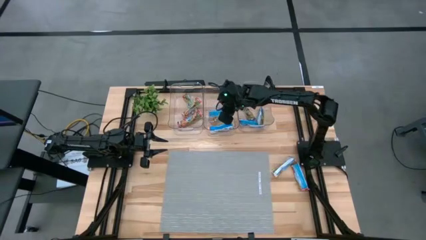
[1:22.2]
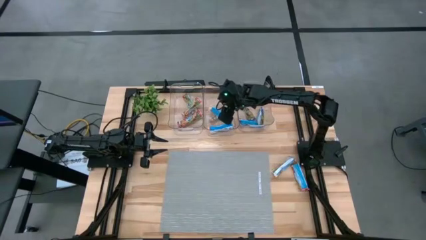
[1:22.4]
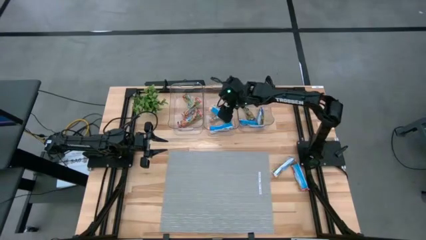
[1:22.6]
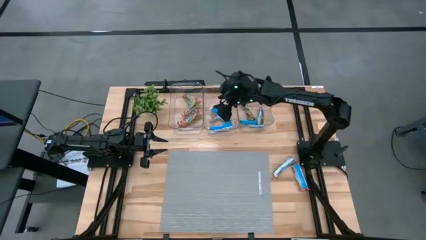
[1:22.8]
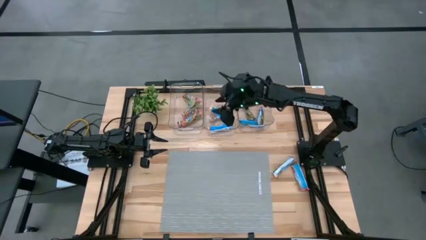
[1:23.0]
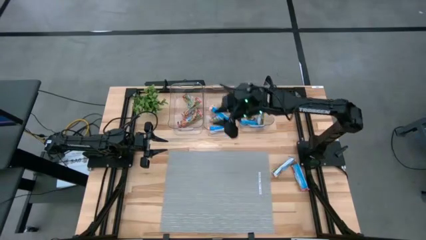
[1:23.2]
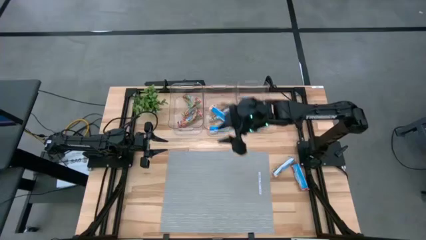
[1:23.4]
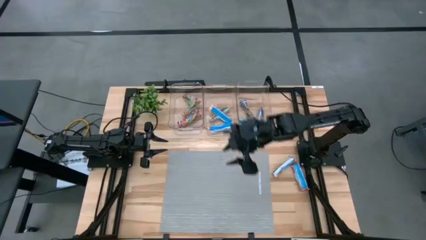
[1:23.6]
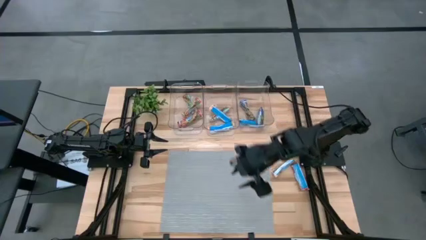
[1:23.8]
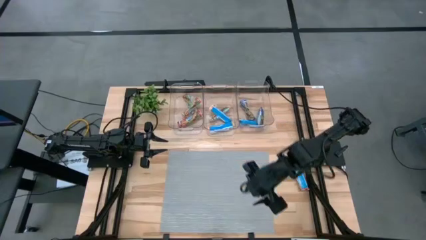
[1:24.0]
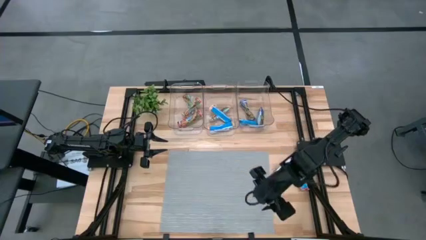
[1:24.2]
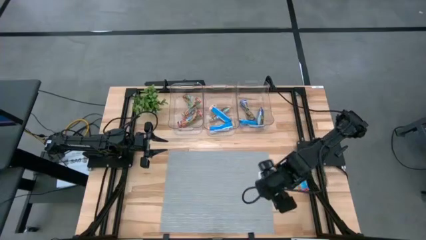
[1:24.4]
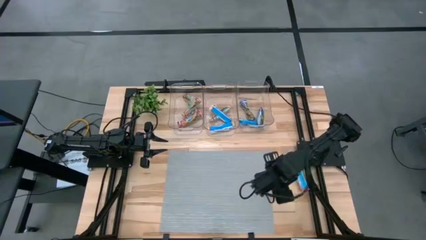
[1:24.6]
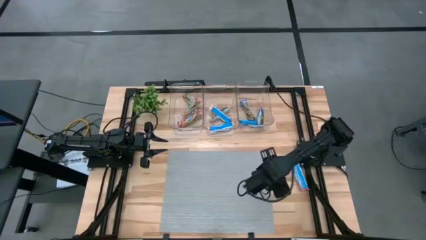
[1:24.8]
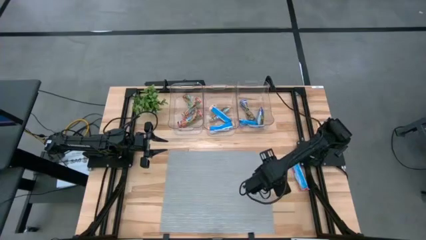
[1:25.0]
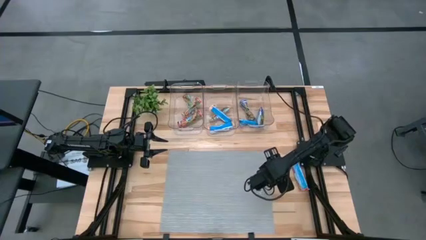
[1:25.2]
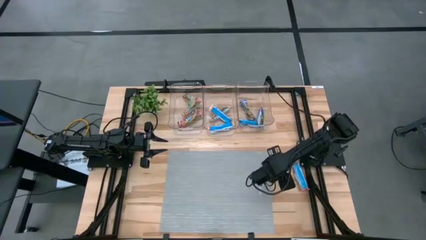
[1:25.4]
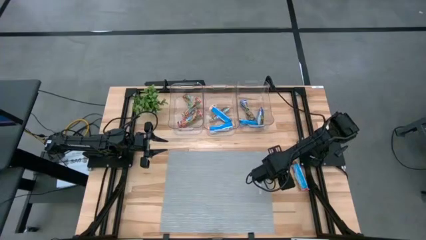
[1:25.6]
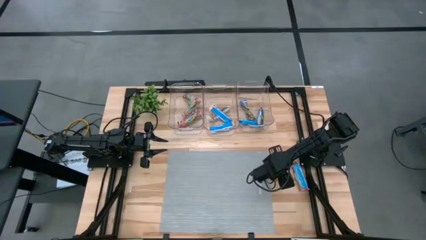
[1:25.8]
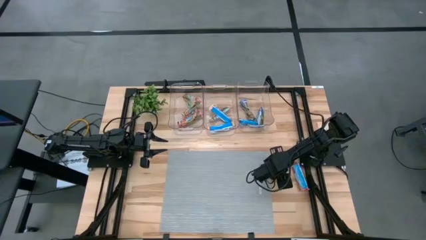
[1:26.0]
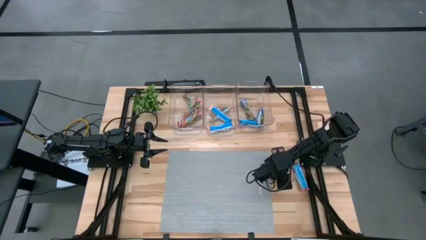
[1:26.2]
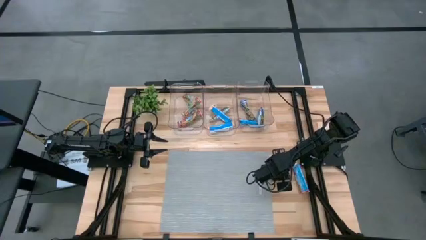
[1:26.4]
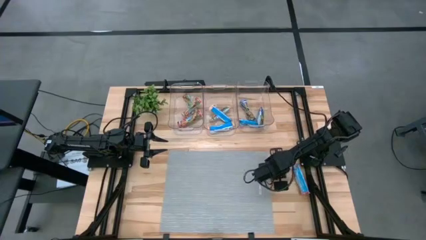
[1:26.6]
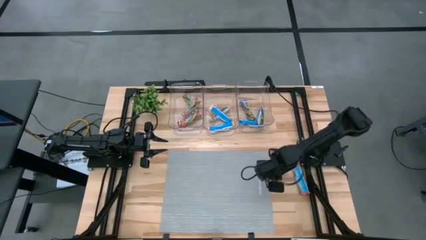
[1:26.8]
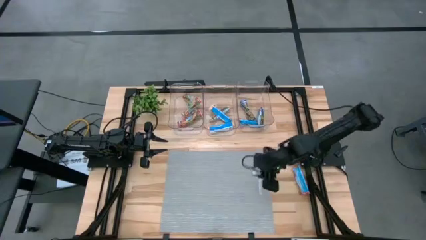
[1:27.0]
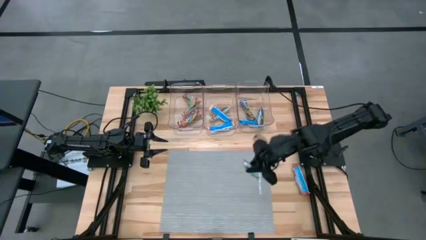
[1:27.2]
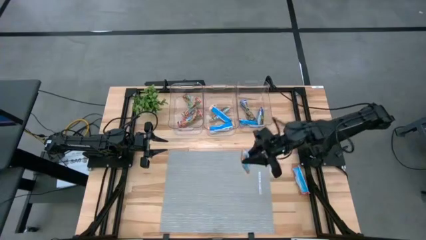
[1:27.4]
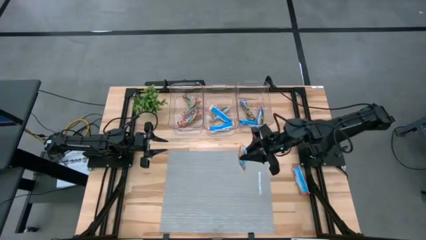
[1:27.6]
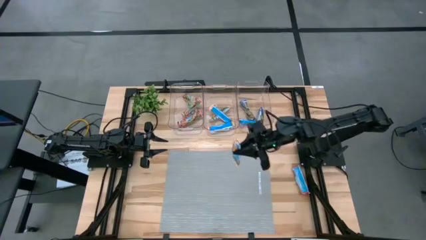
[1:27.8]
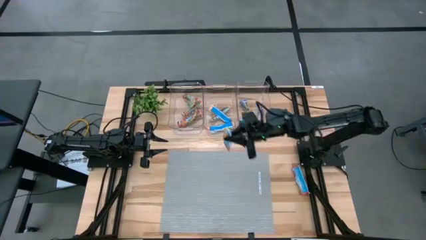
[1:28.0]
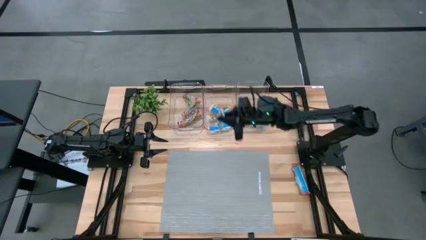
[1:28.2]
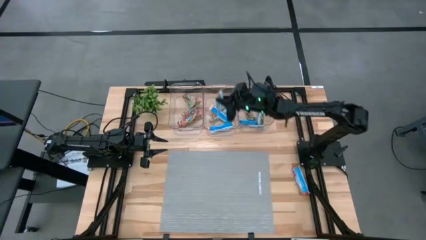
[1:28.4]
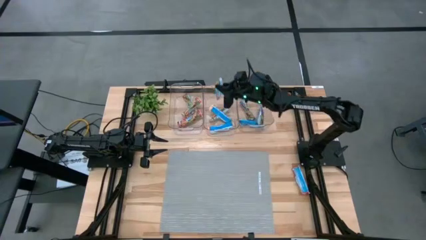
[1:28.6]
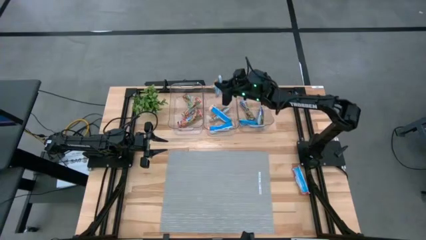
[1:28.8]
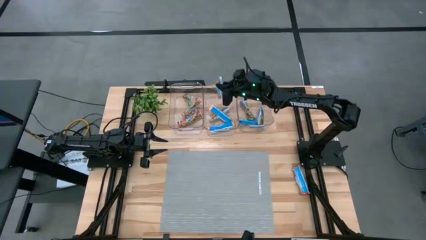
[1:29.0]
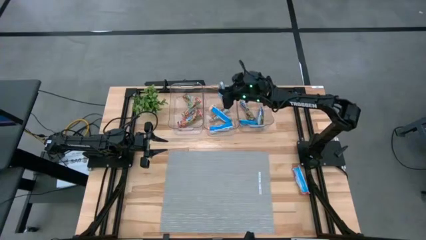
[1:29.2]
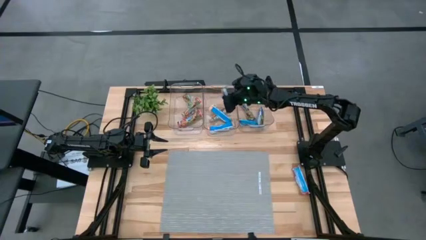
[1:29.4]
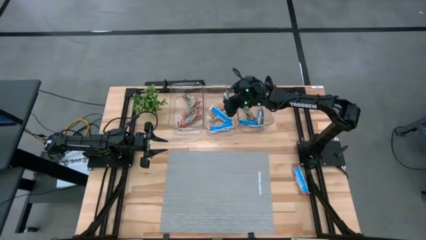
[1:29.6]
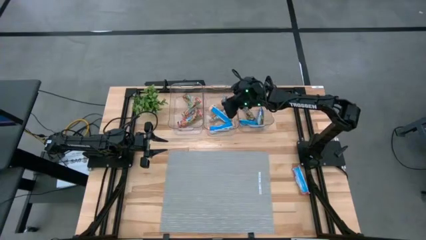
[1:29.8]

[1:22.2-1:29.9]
Task: Pick and place Granola Bars by type
Put the yellow granola bar into the middle transparent bin

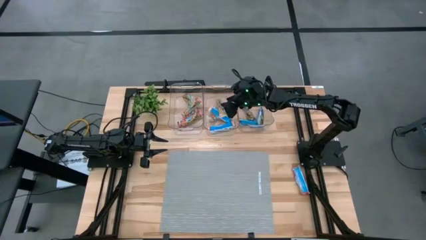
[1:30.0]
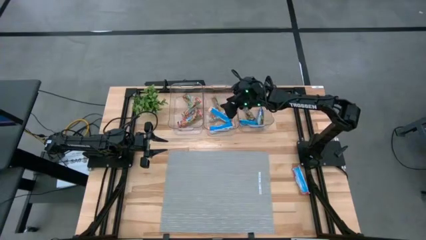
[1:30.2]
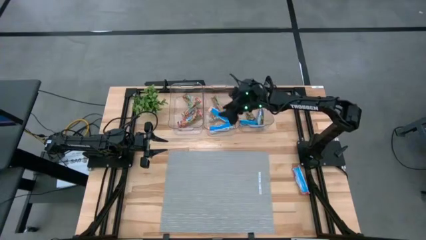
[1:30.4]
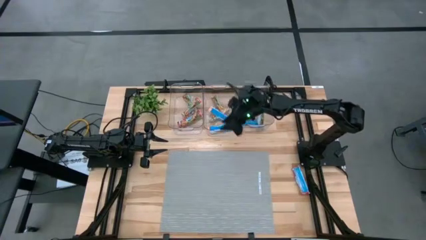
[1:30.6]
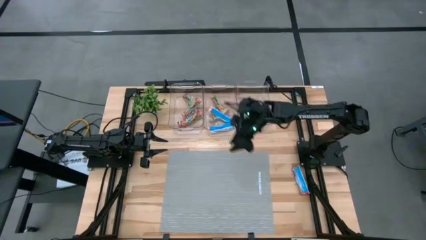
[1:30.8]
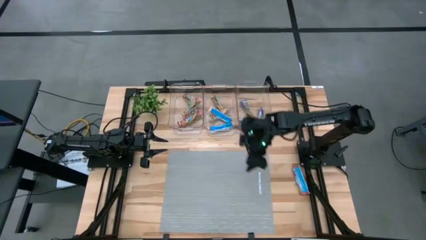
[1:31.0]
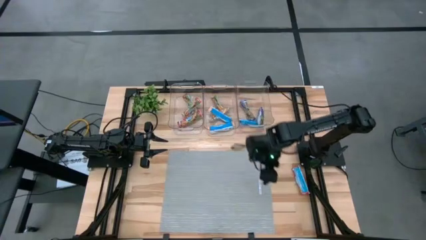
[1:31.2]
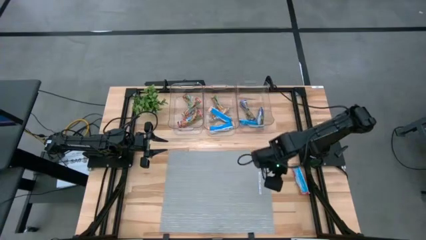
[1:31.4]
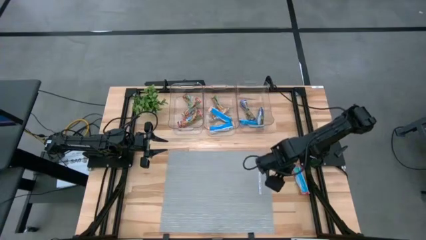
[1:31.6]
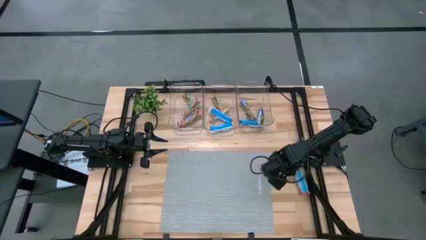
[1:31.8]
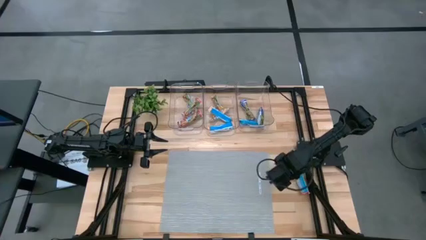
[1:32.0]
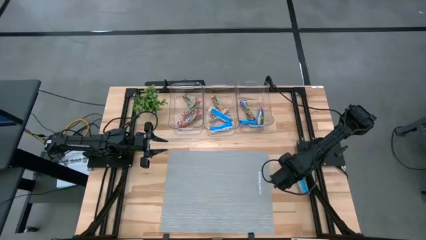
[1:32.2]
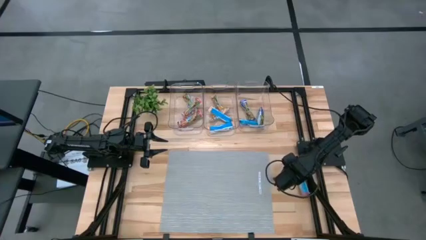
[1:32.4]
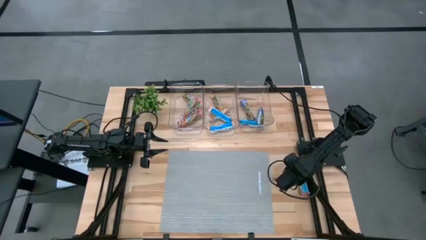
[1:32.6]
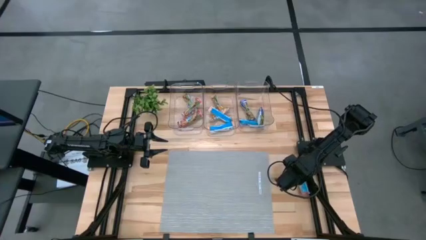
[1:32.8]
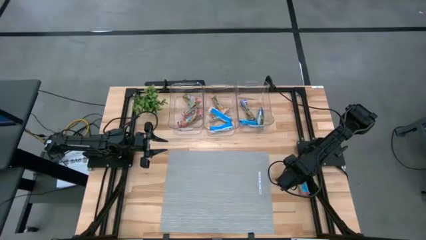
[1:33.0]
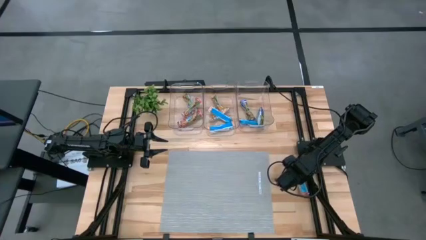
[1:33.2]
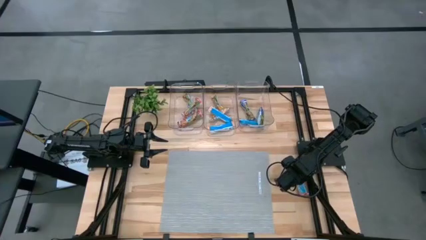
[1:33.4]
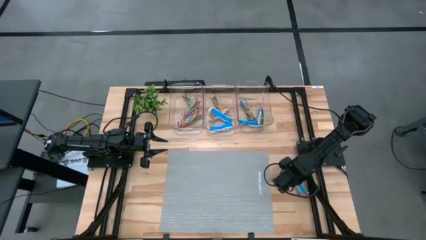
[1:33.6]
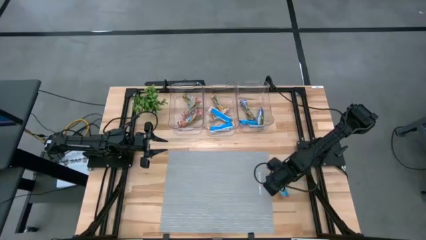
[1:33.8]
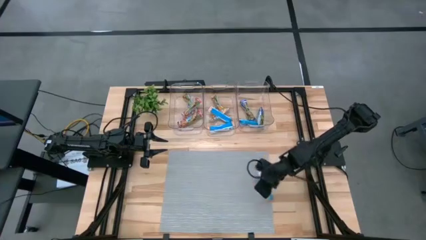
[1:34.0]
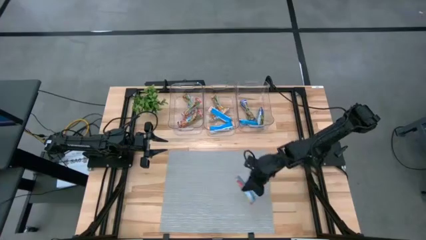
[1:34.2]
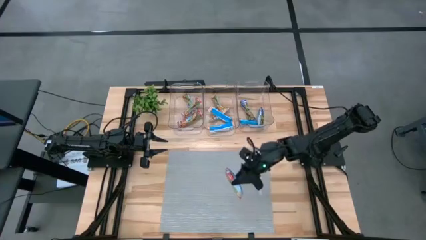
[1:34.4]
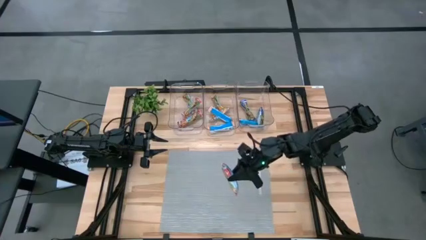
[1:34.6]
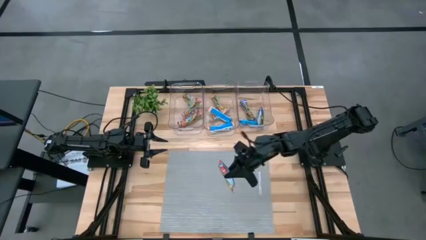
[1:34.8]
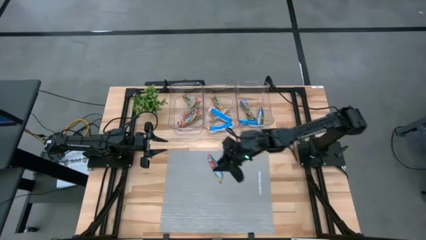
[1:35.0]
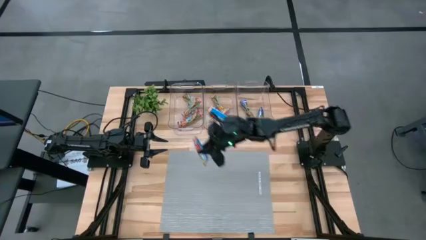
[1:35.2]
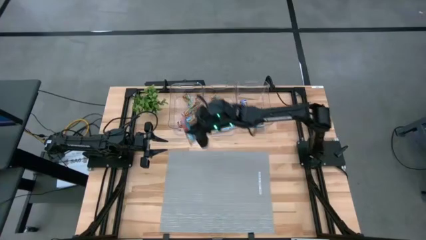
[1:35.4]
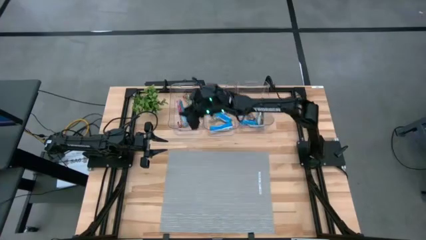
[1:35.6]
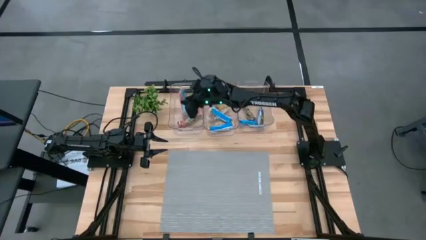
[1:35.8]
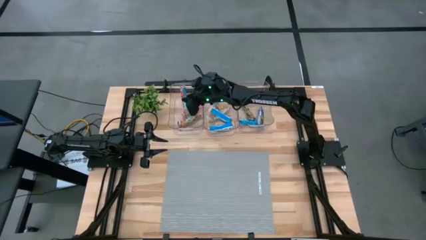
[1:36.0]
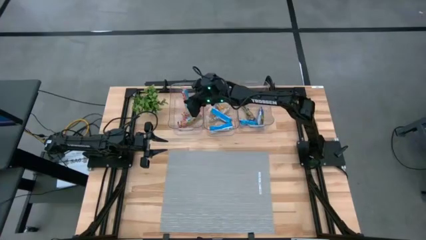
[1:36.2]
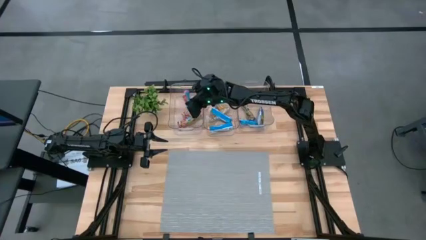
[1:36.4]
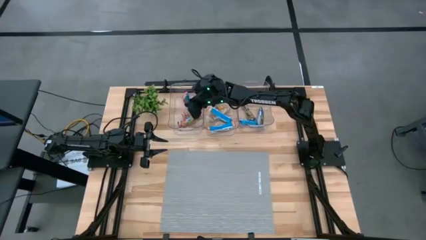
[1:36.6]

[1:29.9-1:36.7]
Put the red granola bar into the left transparent bin
